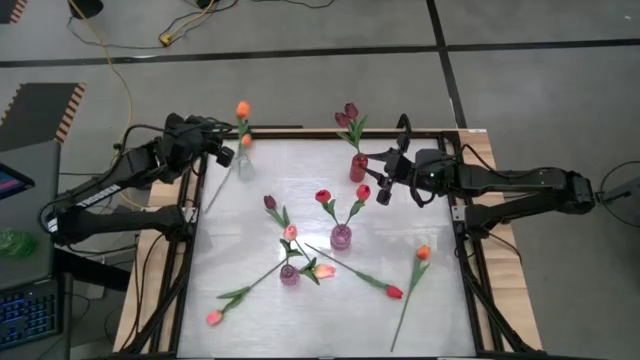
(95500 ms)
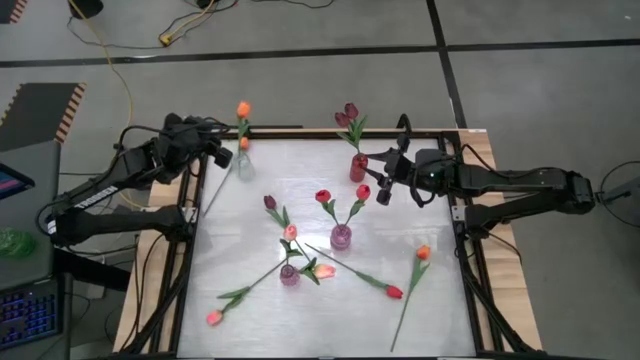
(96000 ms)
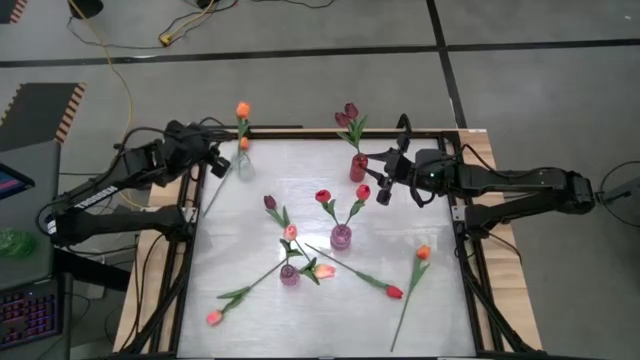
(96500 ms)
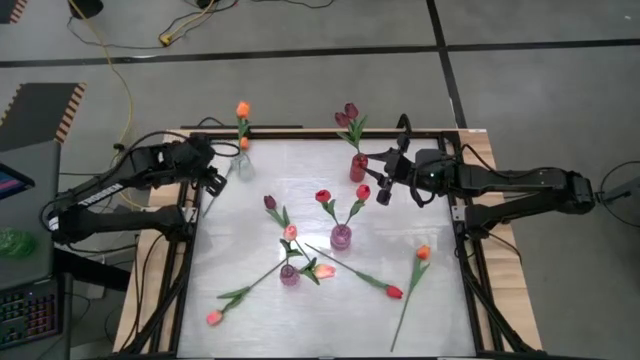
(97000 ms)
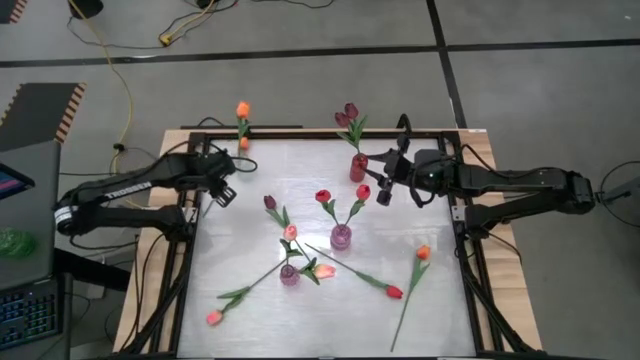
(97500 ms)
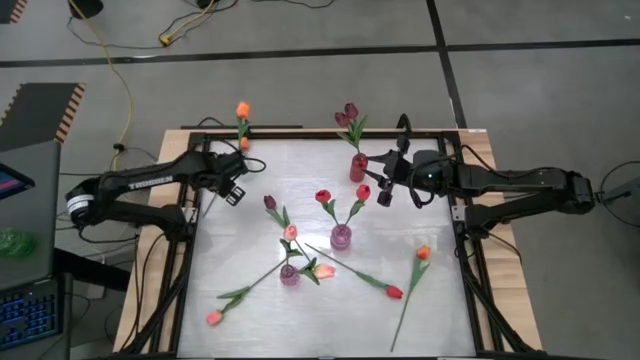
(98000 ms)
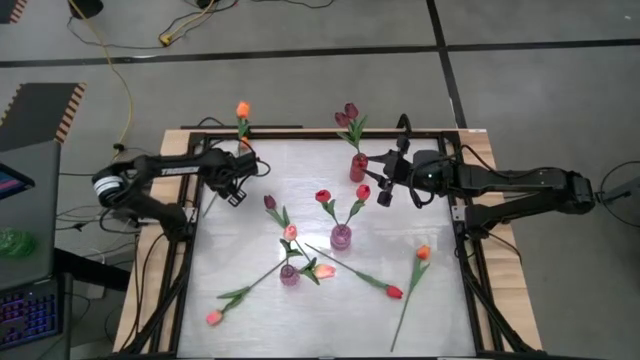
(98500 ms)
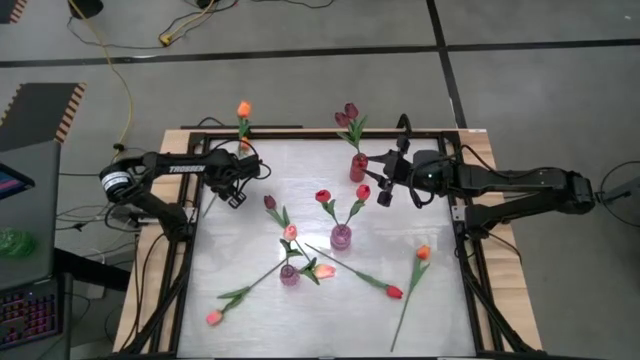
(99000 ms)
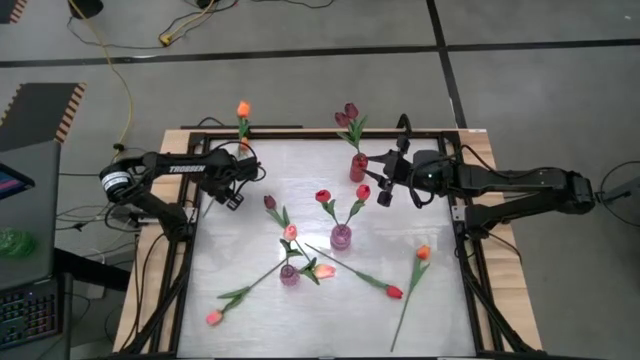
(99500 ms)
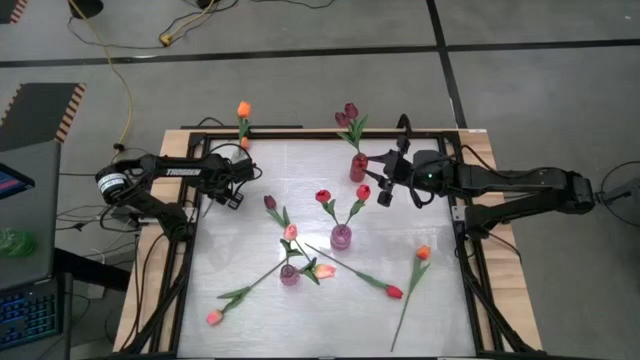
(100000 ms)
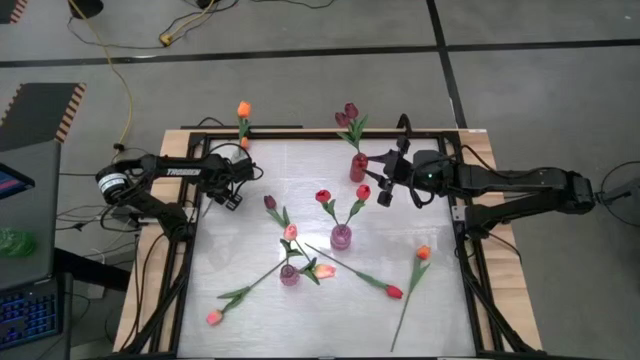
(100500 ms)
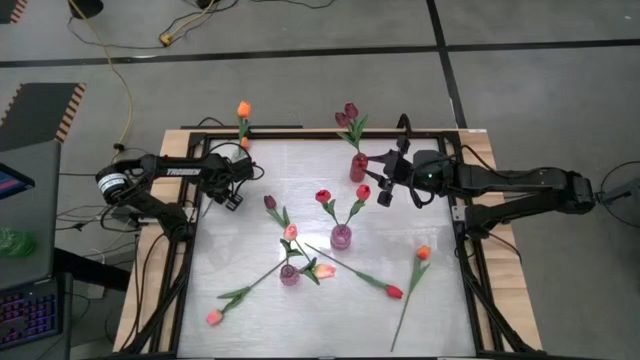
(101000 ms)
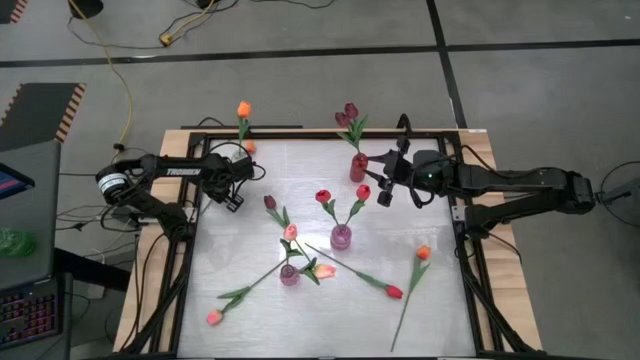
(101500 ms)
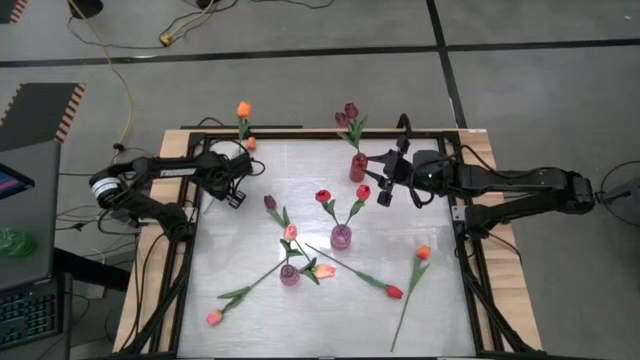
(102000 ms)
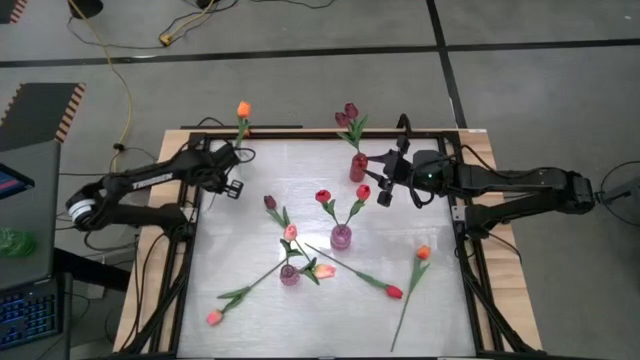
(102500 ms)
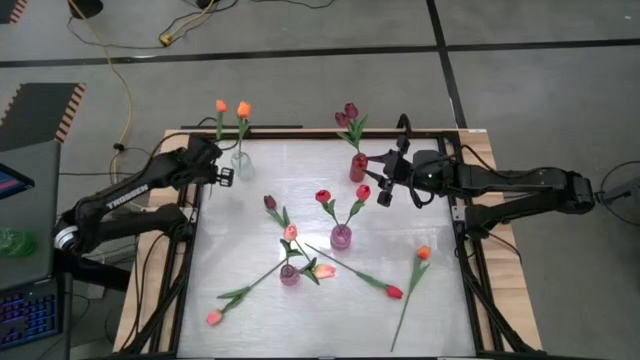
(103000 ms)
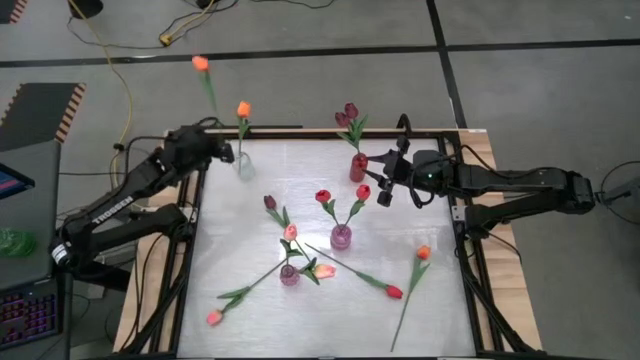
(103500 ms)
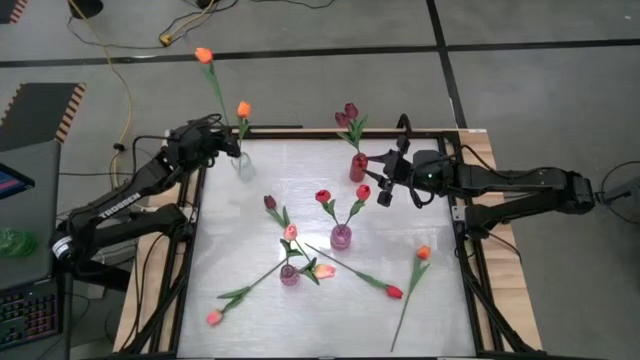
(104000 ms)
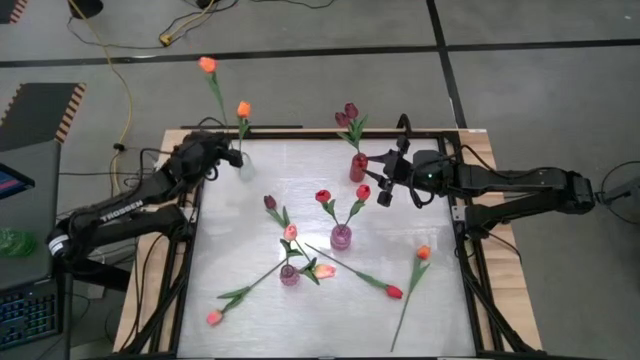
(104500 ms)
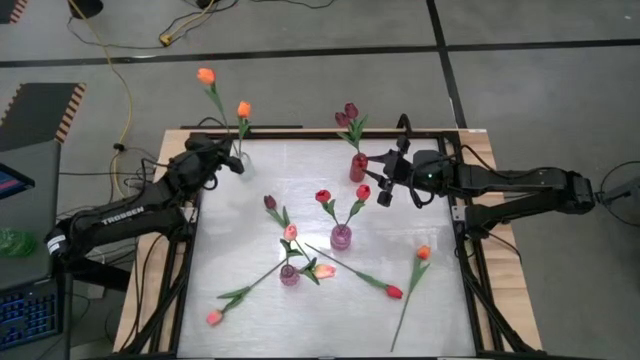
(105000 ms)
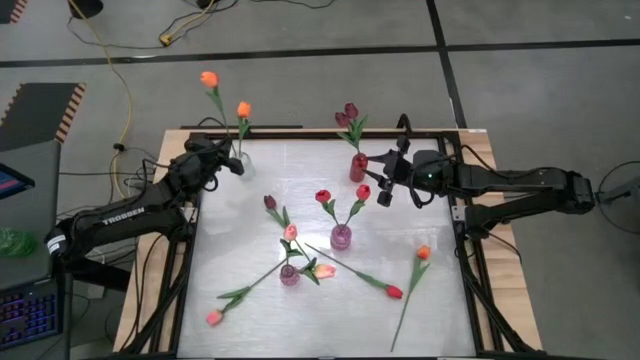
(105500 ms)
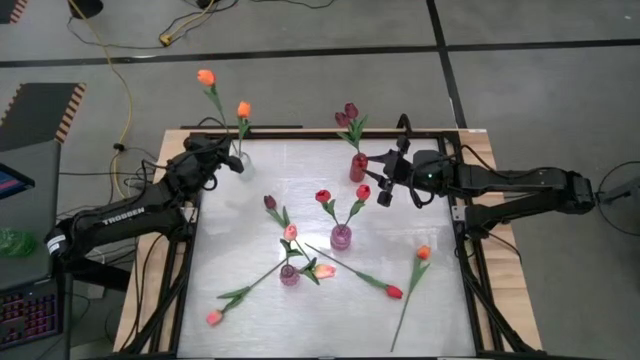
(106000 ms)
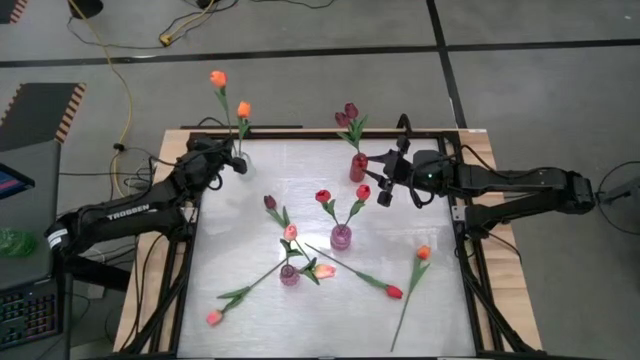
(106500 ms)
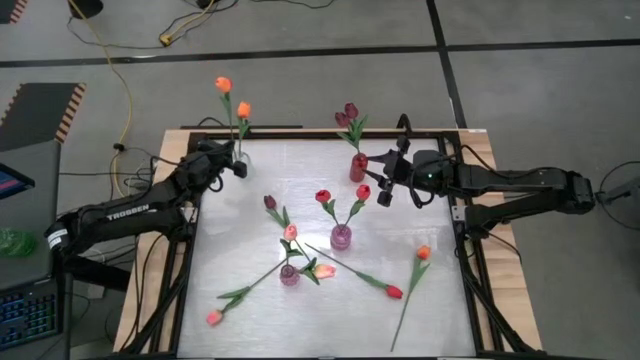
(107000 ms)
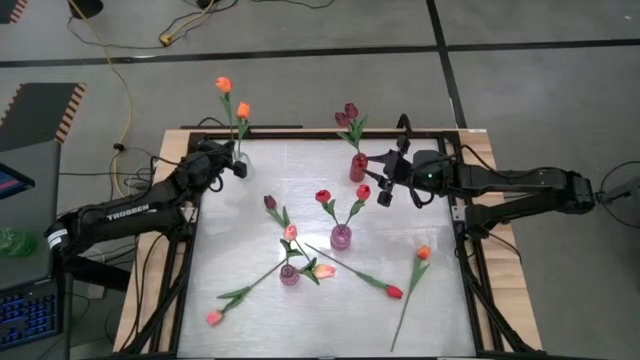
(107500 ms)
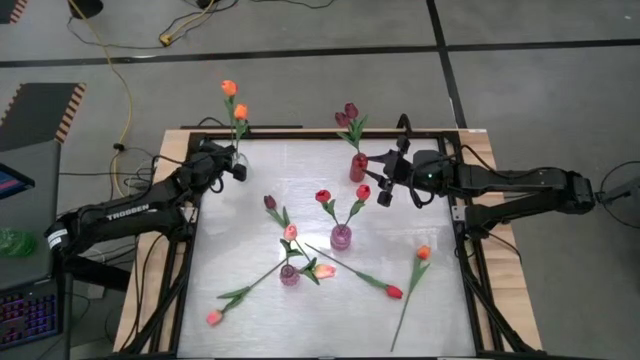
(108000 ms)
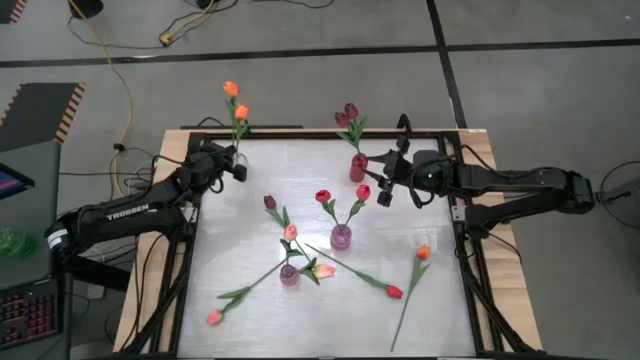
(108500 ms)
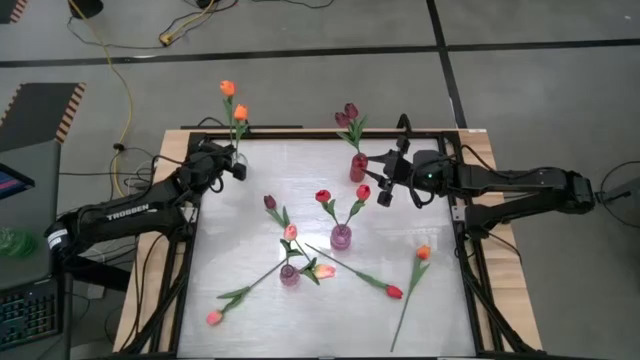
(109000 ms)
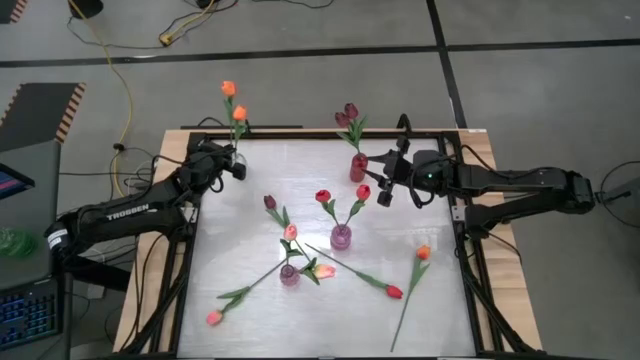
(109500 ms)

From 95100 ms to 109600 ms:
Task: Sort flowers into vase by color
Put the top orange flower into the clear vase

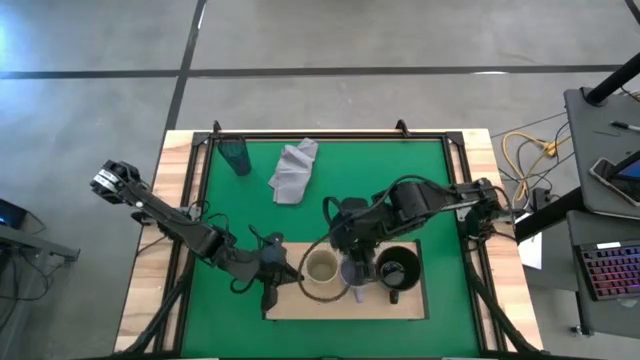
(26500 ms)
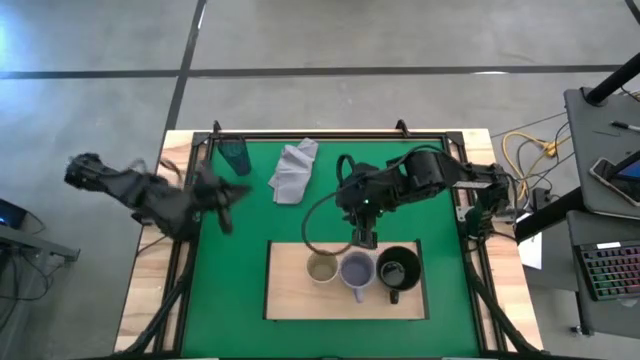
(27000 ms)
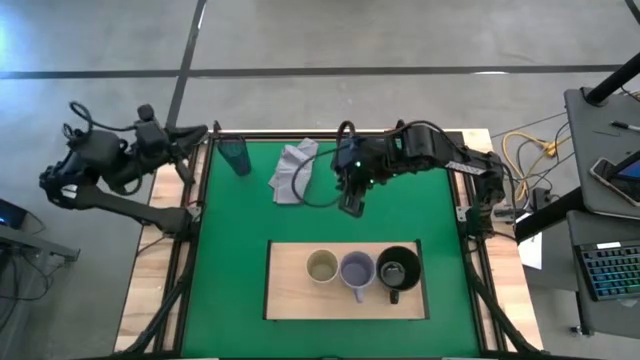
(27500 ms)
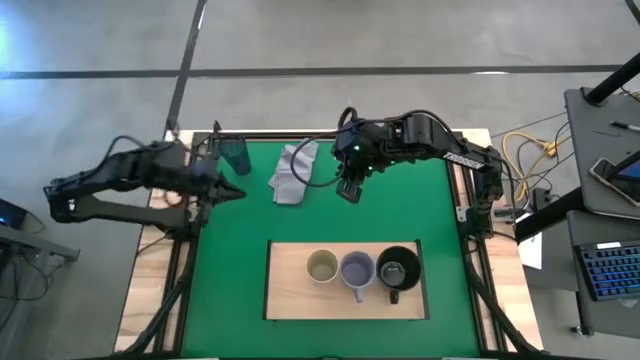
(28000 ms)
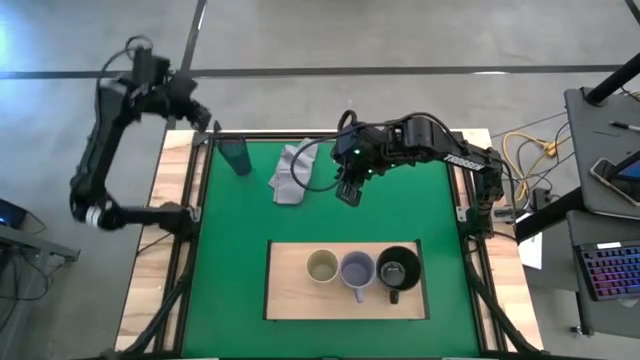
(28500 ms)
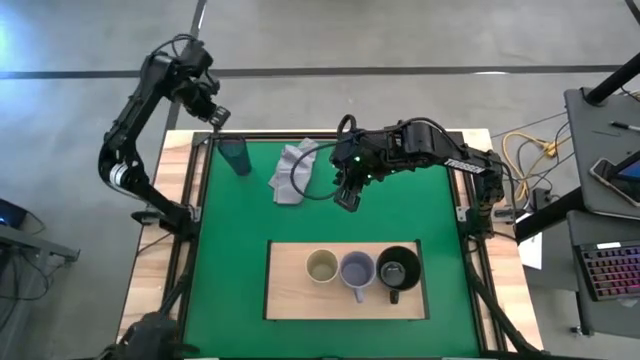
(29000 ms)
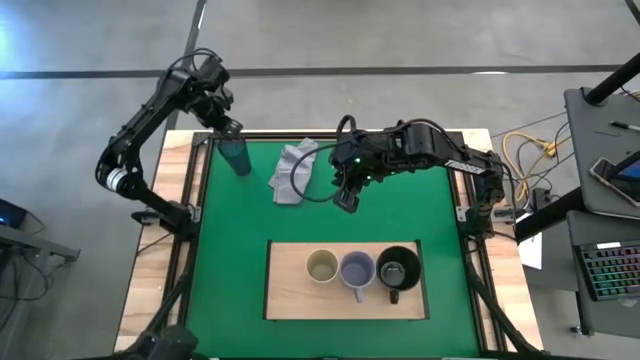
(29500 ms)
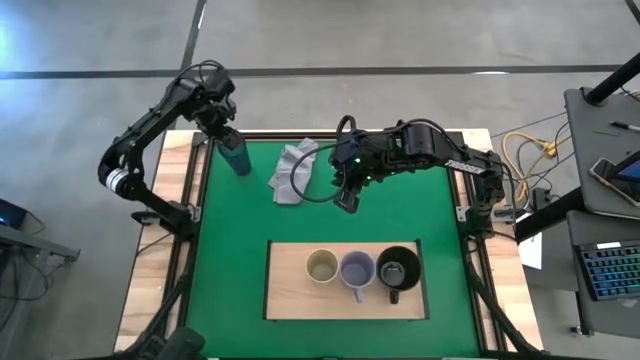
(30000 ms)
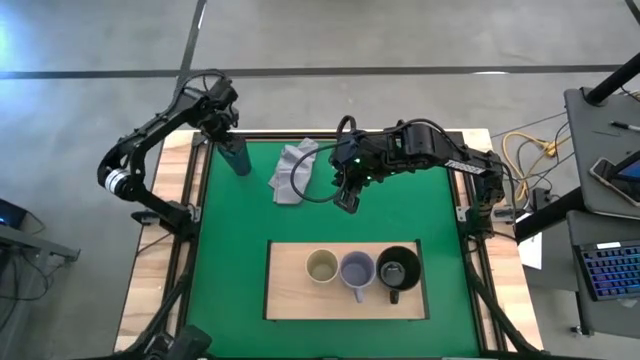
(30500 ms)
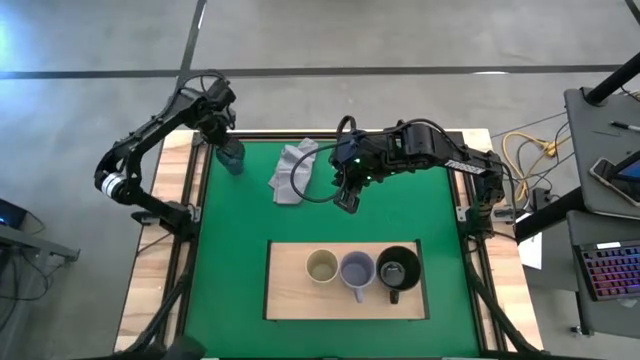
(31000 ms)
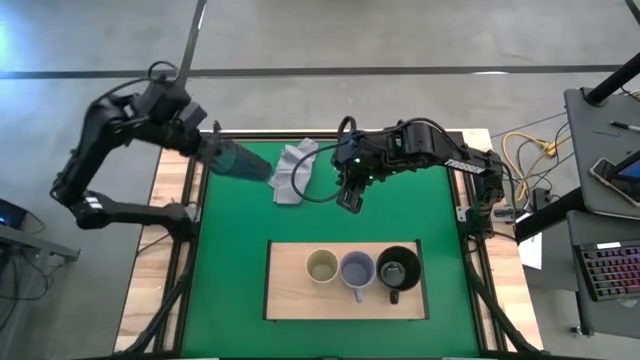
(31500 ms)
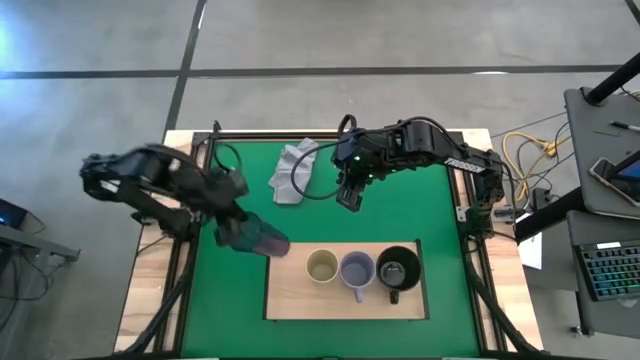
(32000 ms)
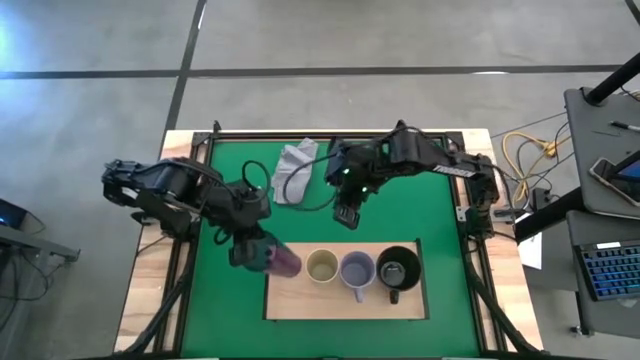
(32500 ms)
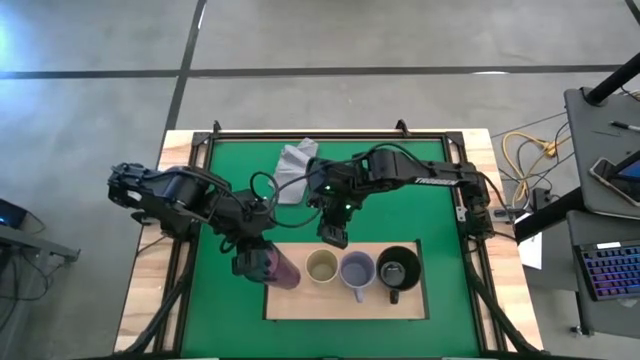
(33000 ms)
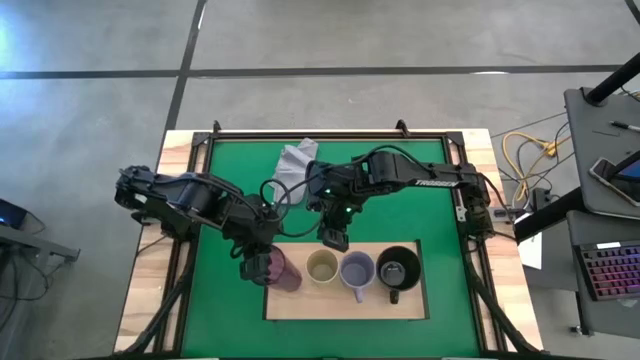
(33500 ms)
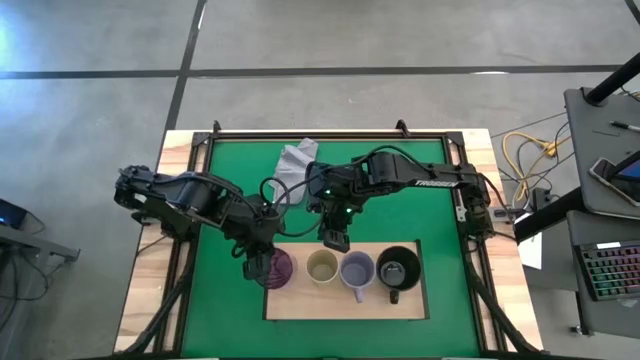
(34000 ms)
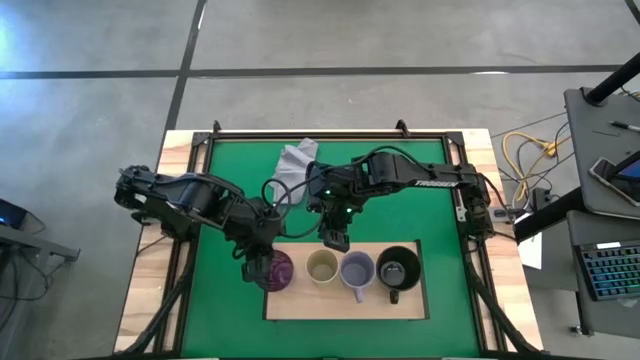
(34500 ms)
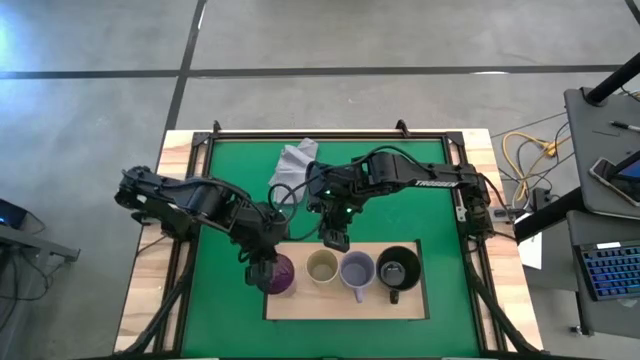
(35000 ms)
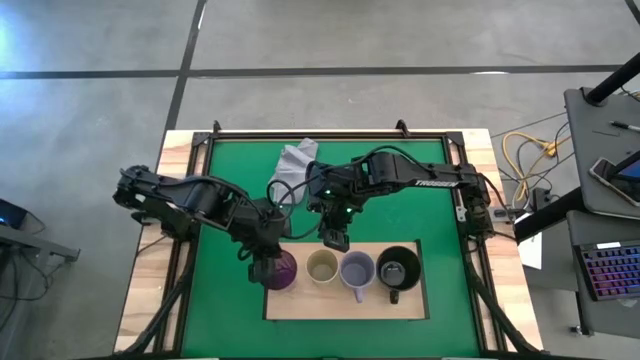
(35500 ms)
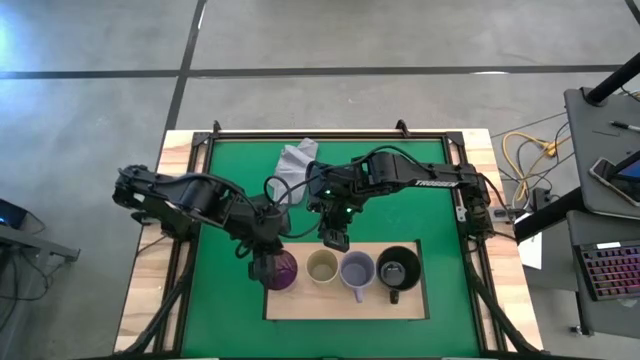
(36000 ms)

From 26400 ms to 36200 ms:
Task: Stack small to large cups/mugs on shelf
Put the blue cup on the shelf
